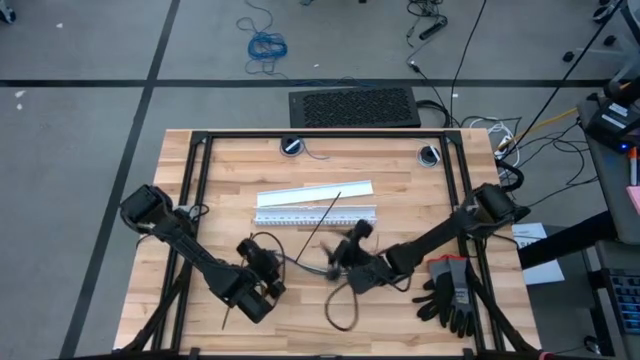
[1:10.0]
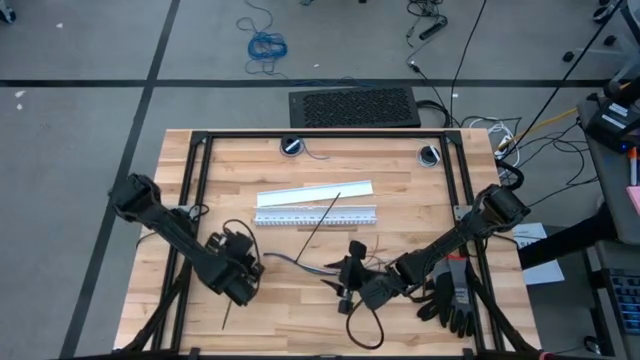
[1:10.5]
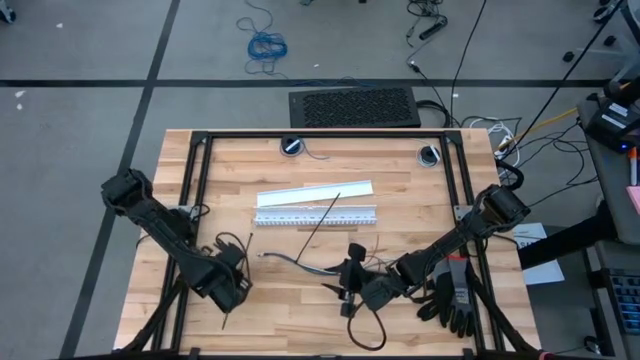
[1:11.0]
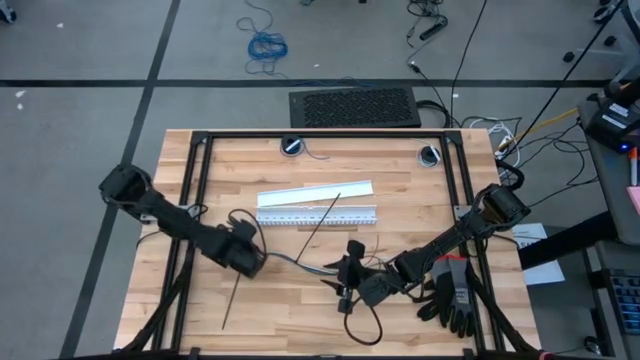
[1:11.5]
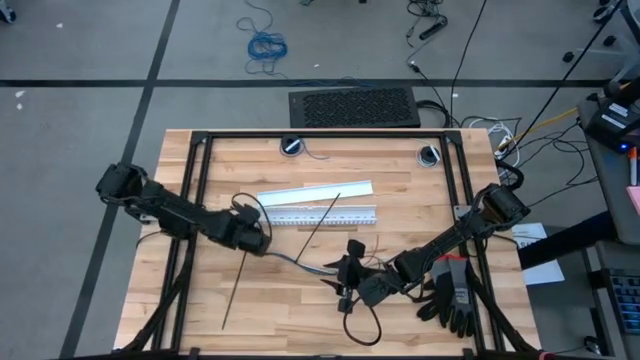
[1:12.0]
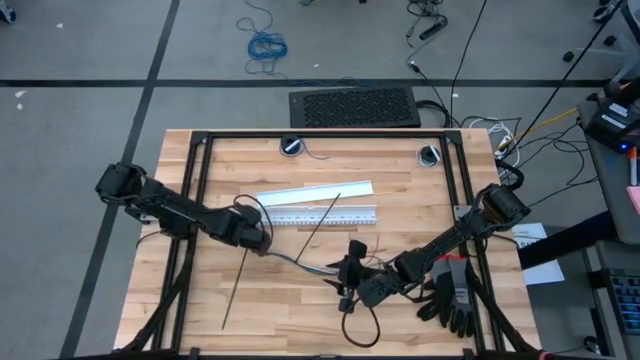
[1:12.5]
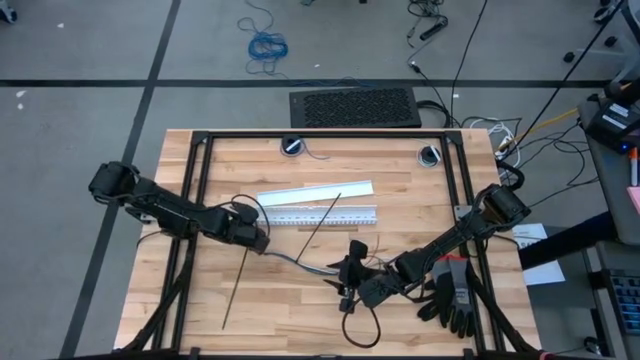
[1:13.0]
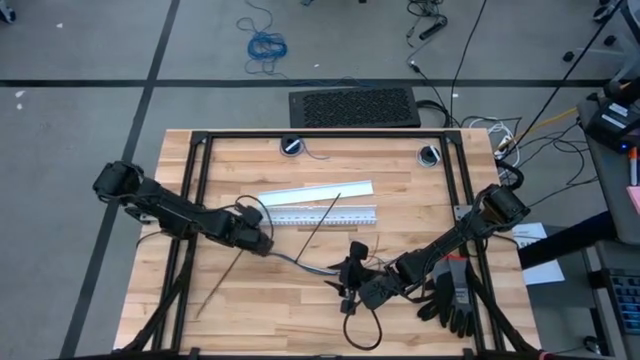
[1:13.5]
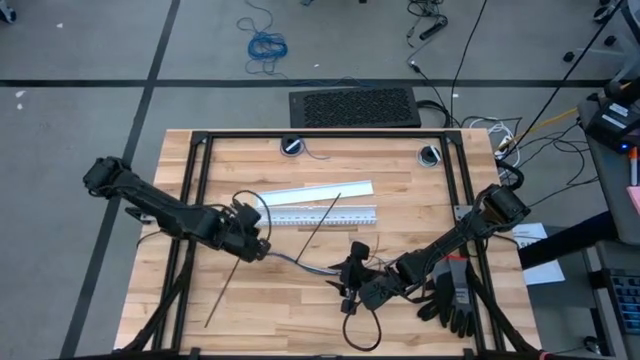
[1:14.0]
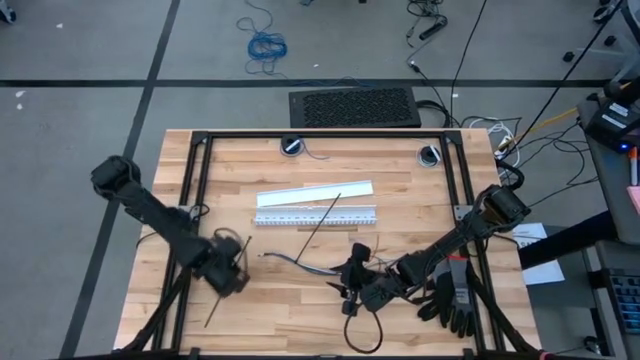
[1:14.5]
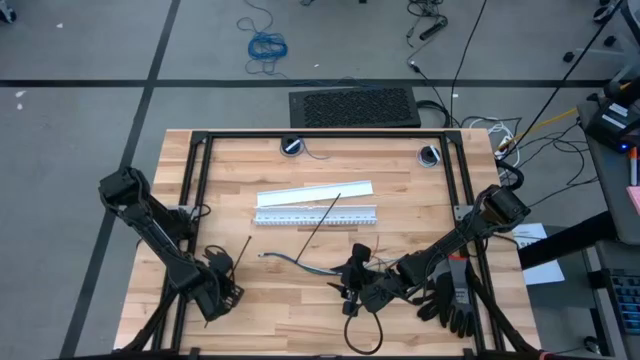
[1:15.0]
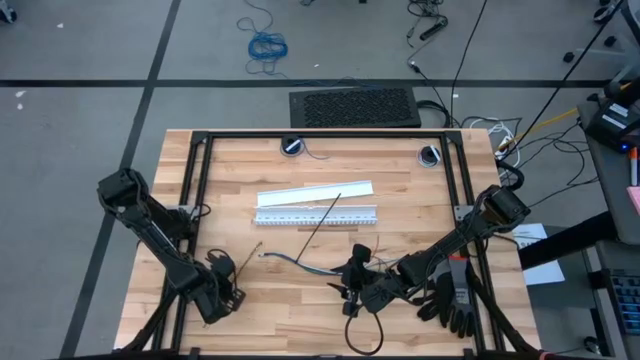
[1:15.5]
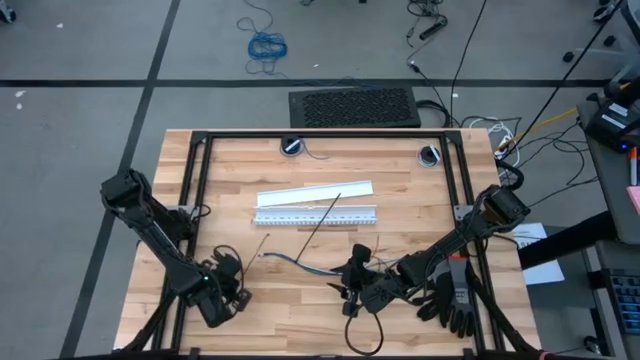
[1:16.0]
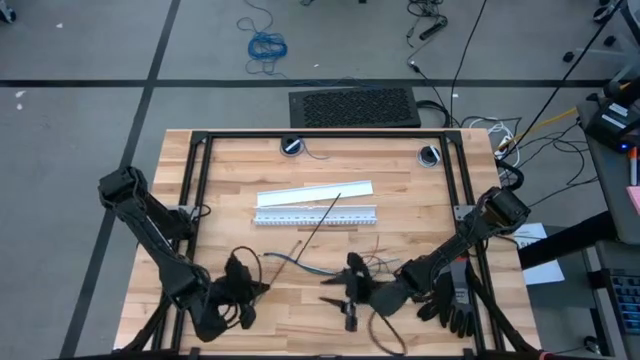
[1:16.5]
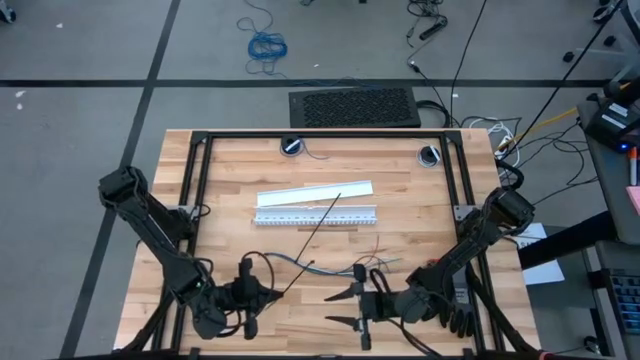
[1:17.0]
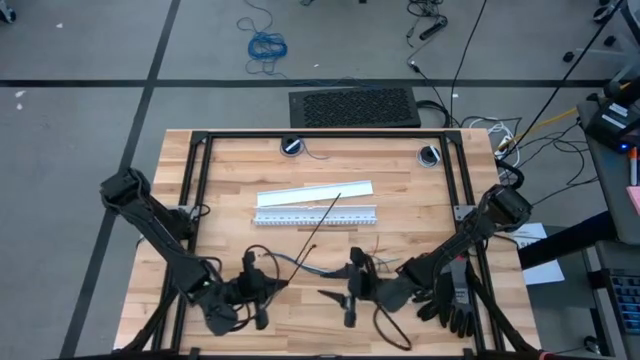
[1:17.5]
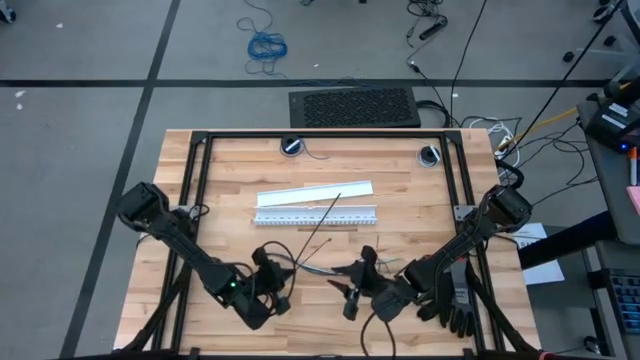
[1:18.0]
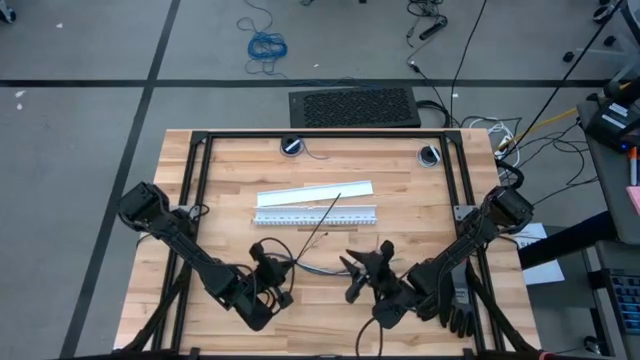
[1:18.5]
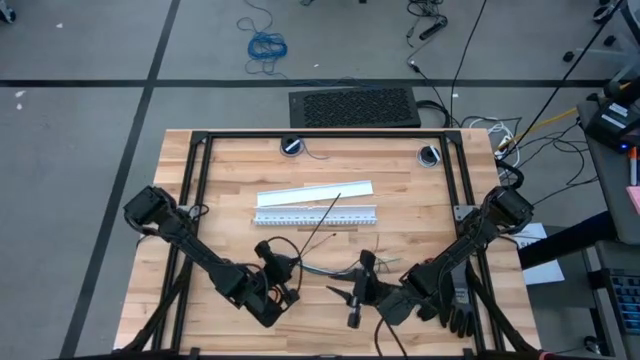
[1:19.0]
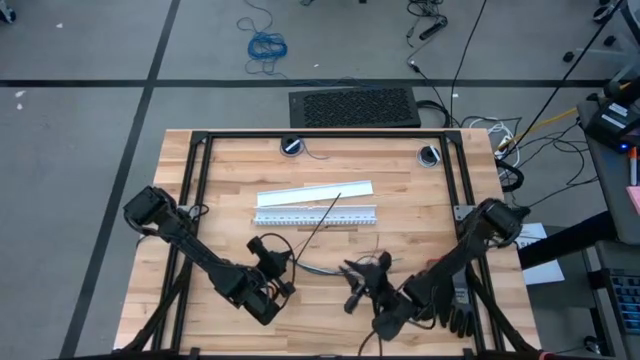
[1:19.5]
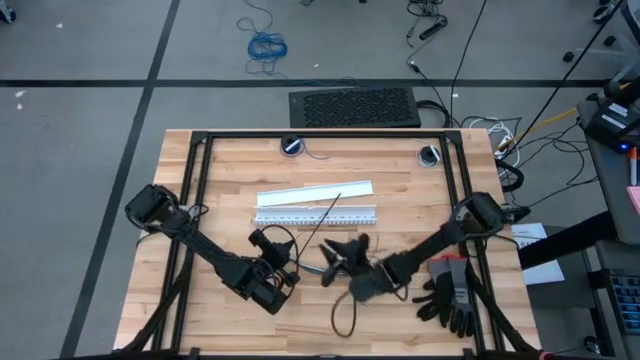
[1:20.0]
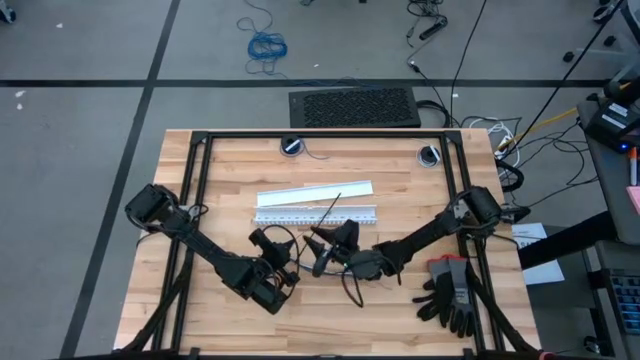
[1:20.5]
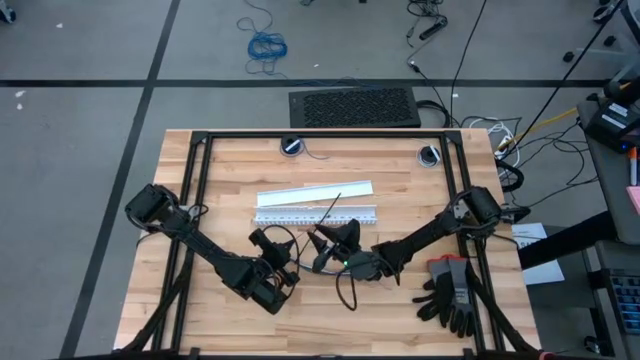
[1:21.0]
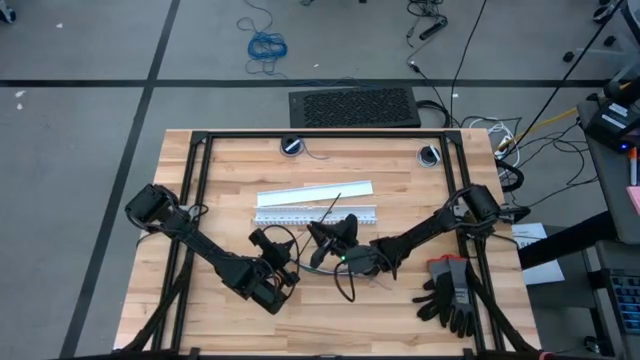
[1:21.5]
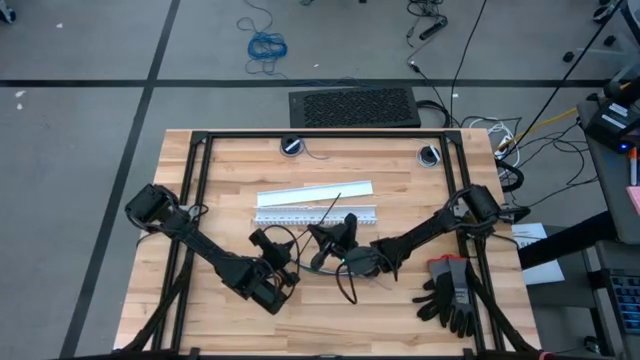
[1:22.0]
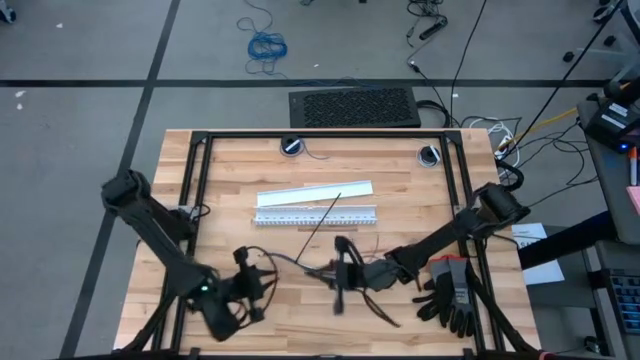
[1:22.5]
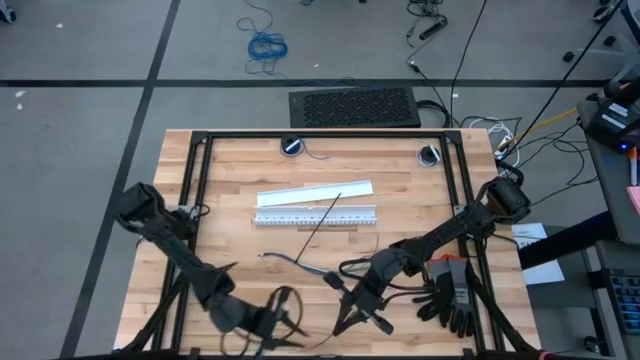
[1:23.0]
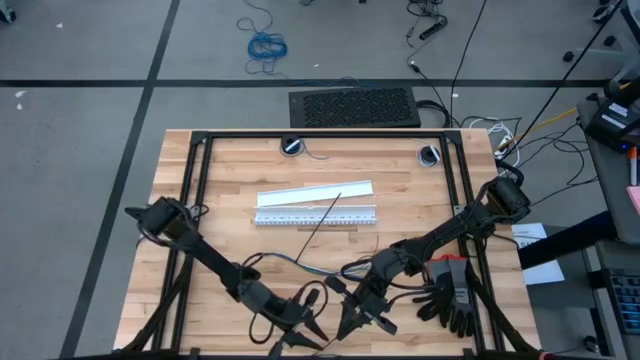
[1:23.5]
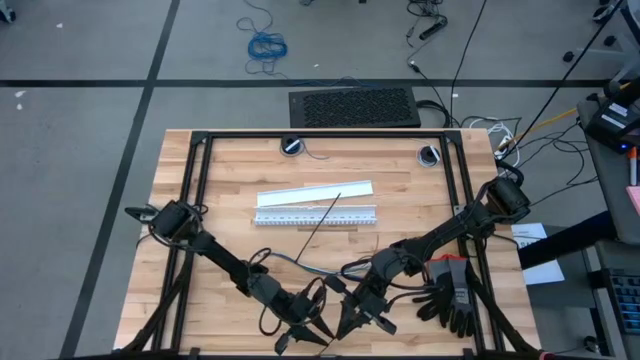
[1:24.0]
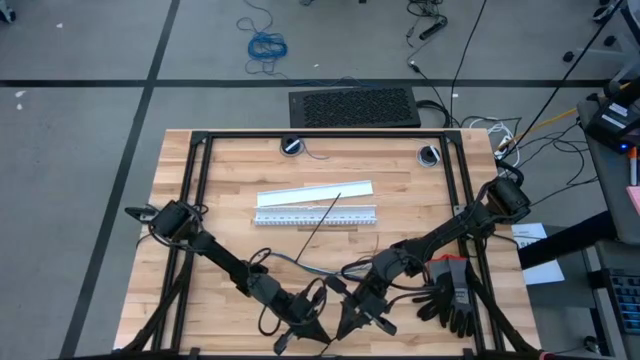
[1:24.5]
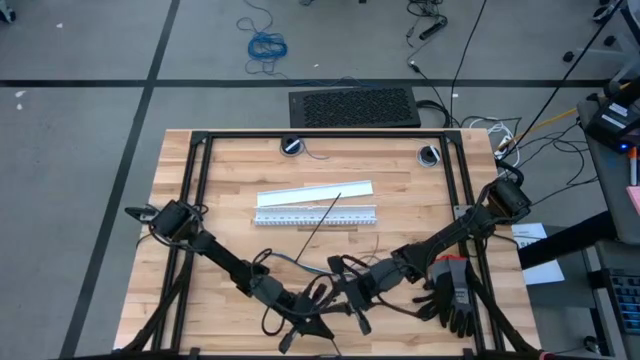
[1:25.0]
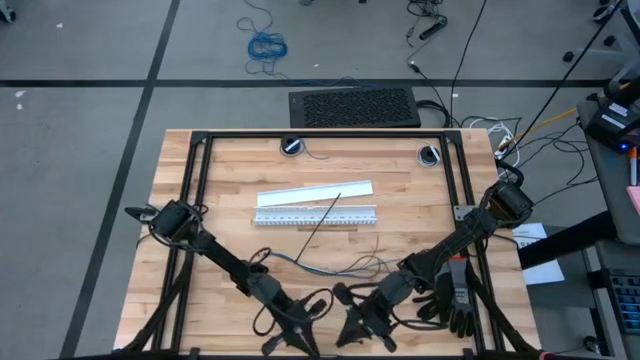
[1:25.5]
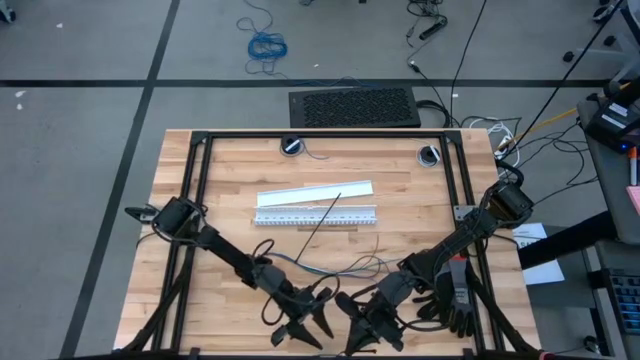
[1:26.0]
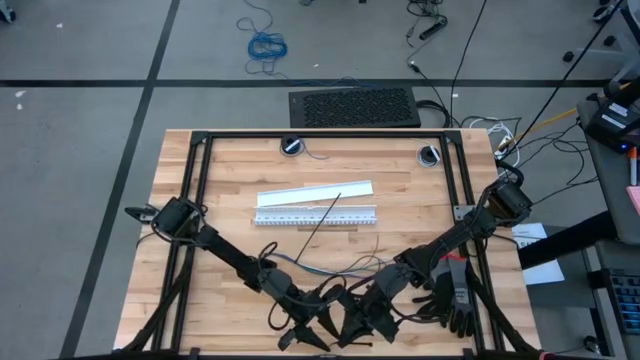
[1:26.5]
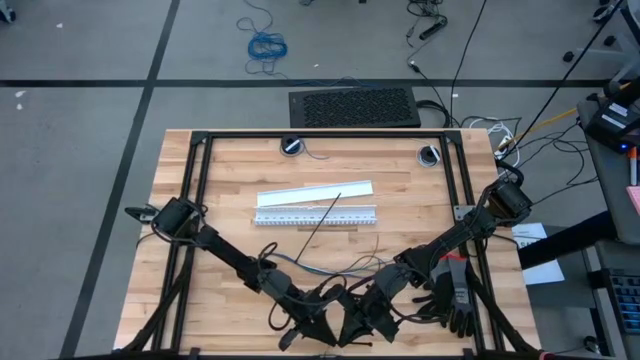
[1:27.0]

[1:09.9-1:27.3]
Task: Ziptie cables
Wrap the black zip tie around the colored cable wires

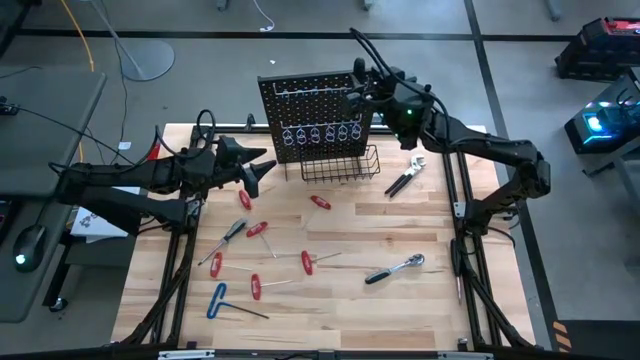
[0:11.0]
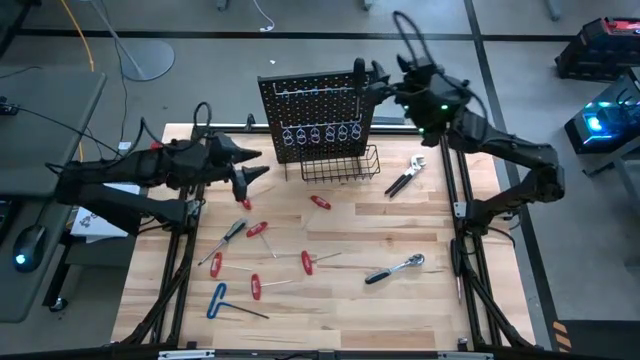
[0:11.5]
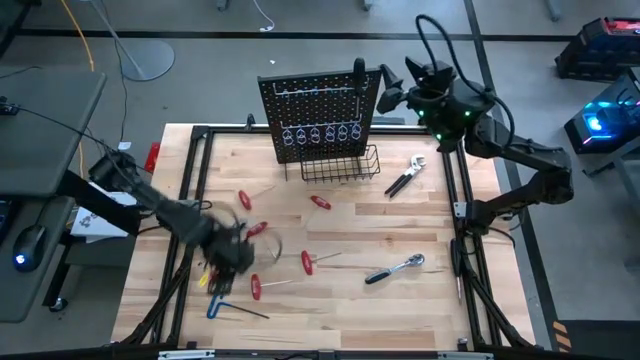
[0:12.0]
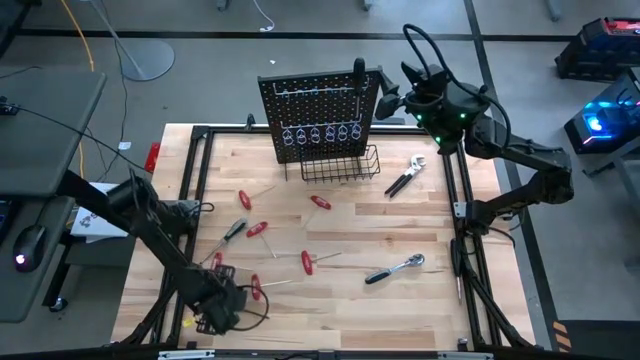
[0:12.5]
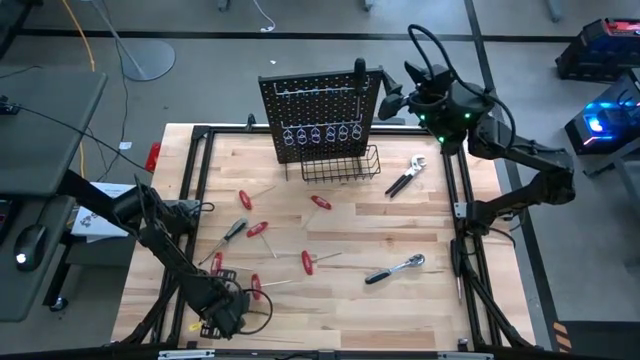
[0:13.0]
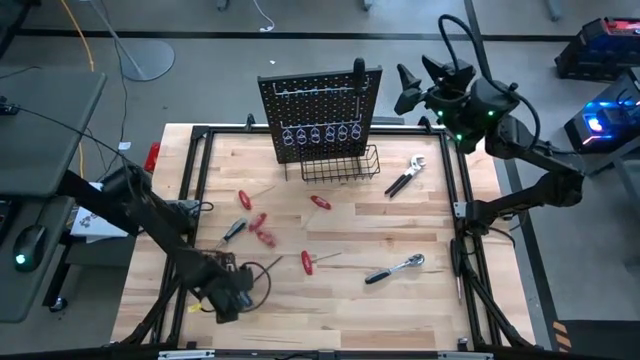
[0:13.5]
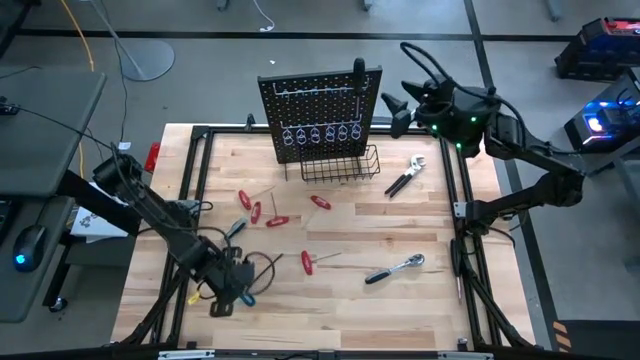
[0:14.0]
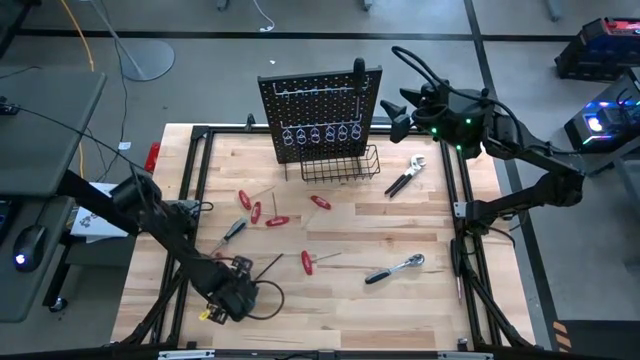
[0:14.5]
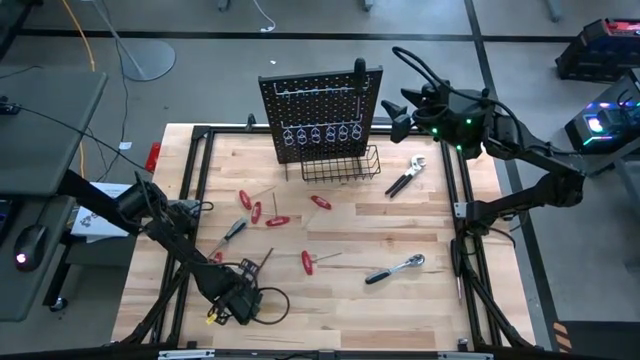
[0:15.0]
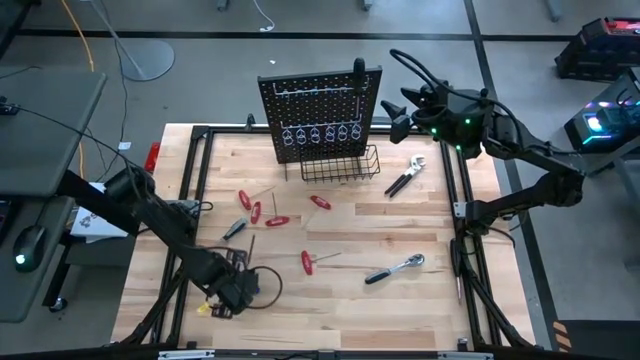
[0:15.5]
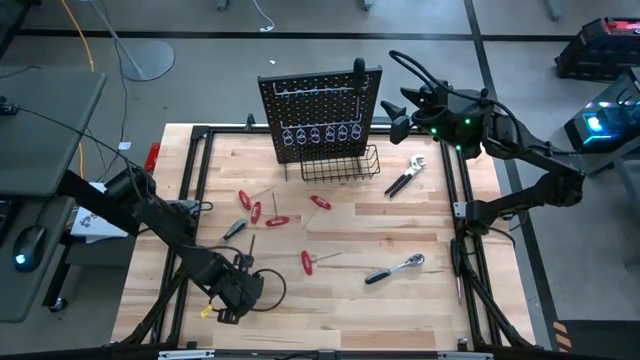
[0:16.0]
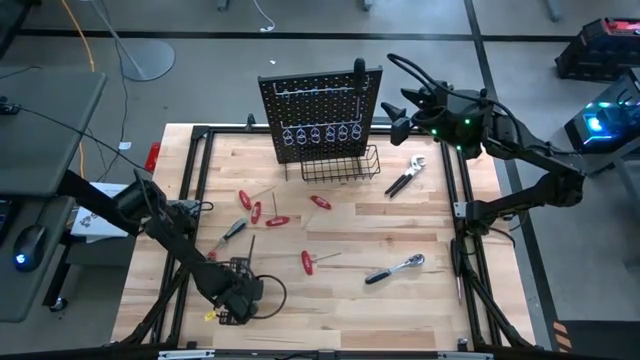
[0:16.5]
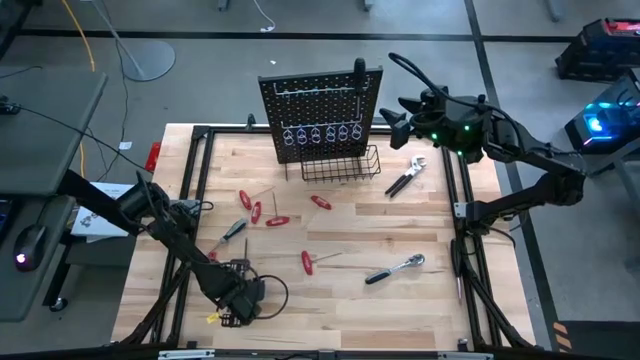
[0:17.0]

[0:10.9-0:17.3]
Task: Hang tools onto peg board
Hang the blue pick tool on the peg board
